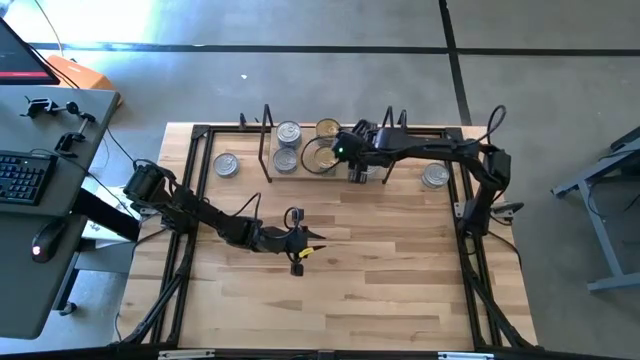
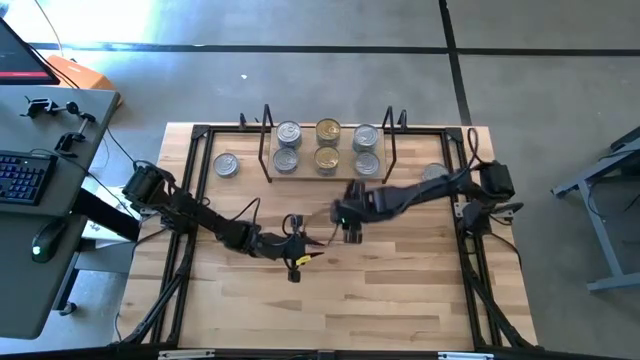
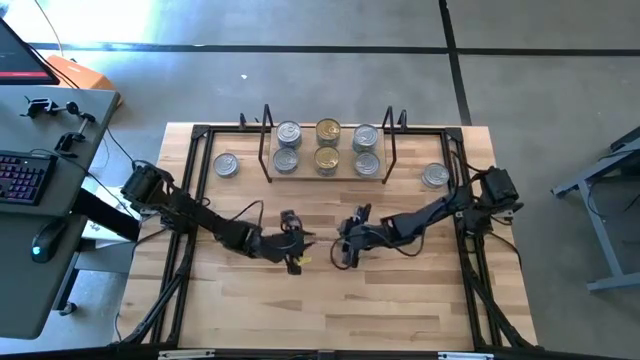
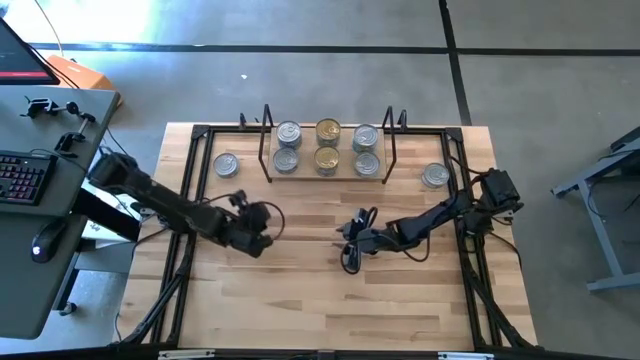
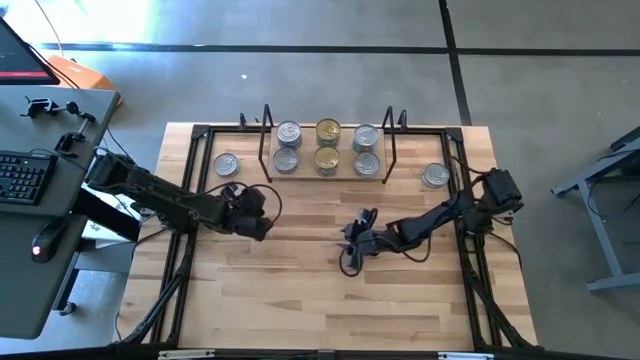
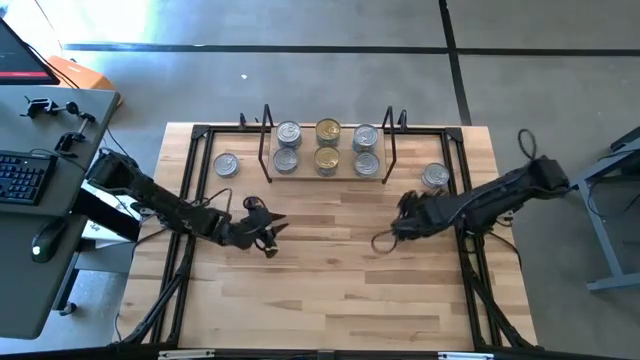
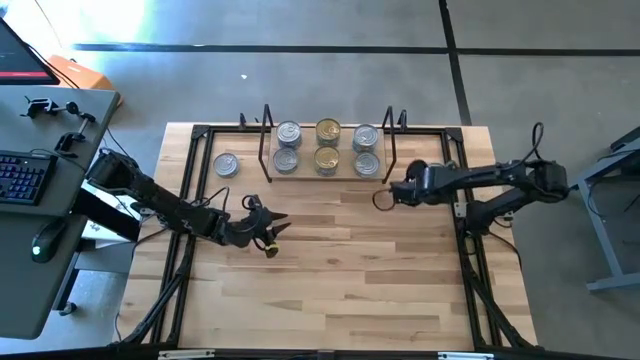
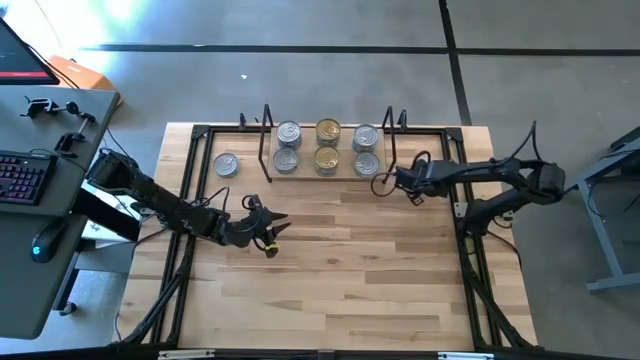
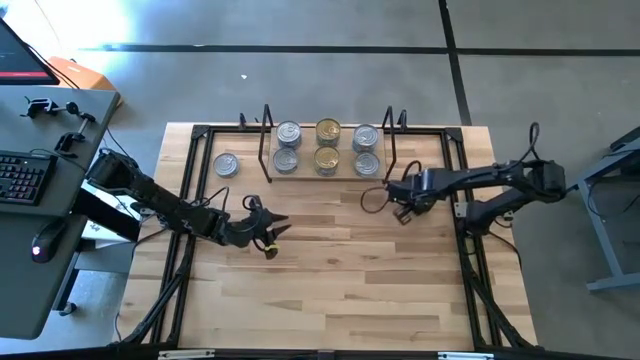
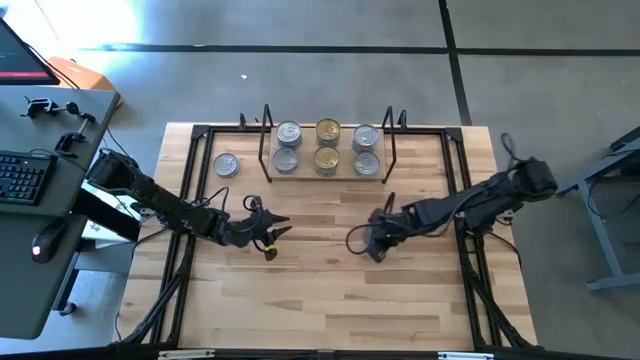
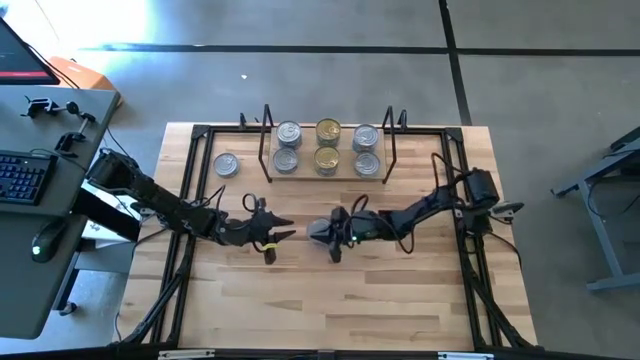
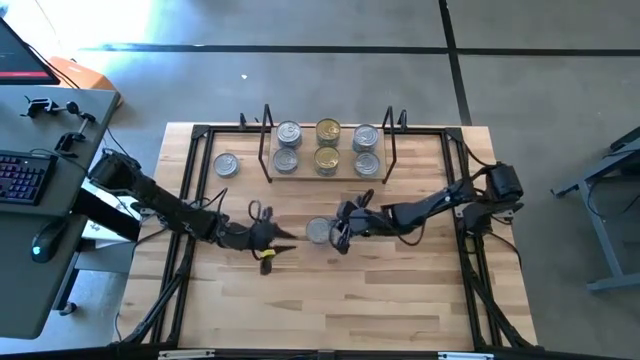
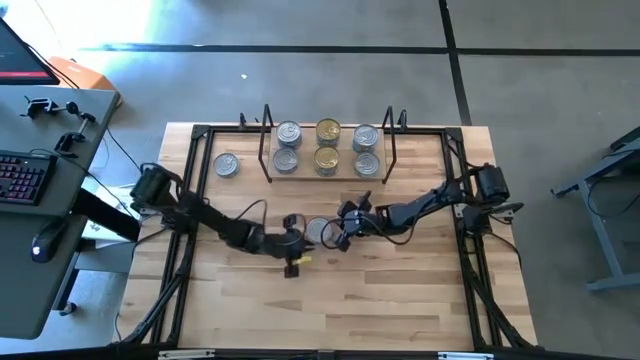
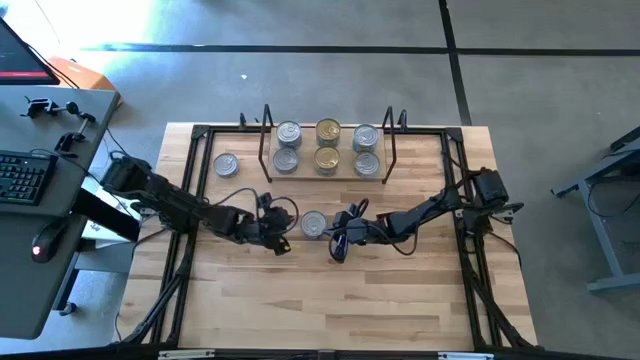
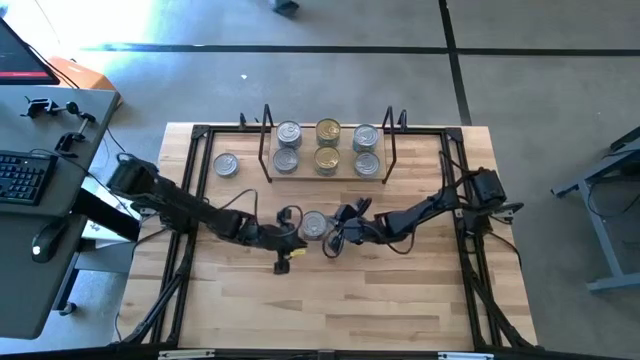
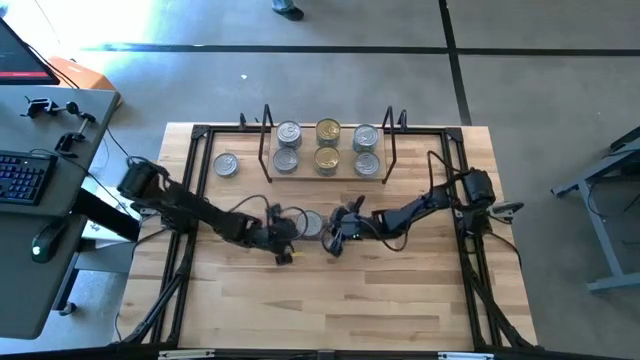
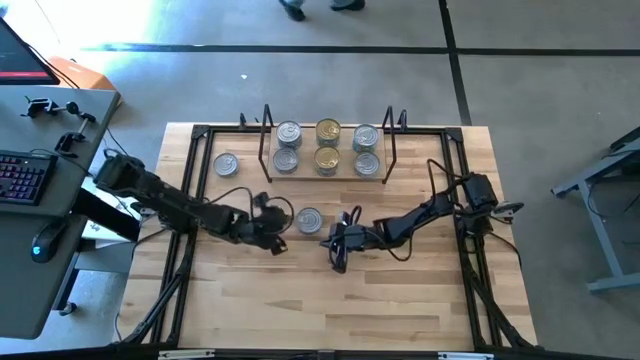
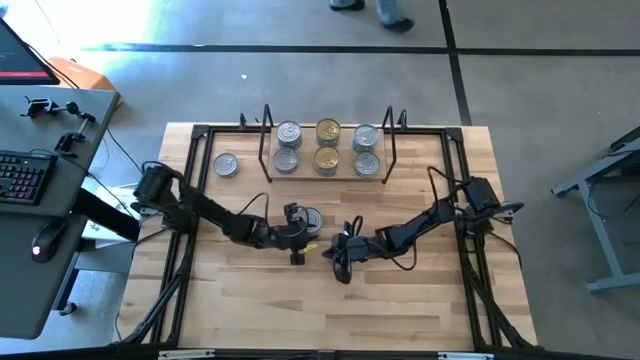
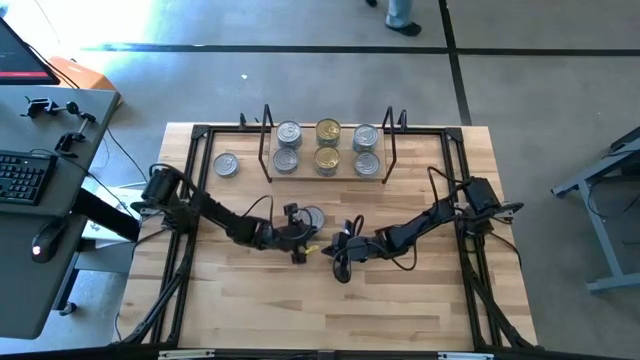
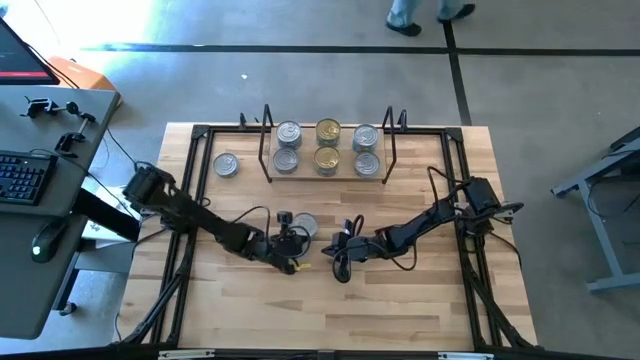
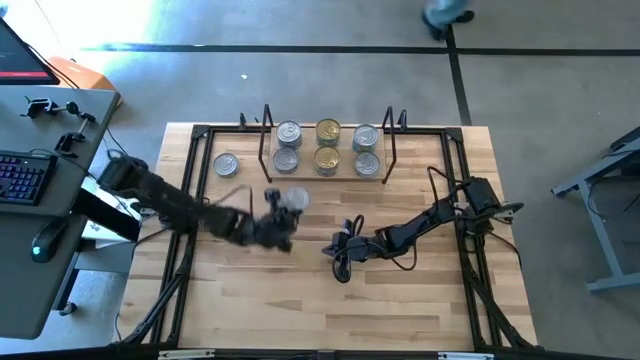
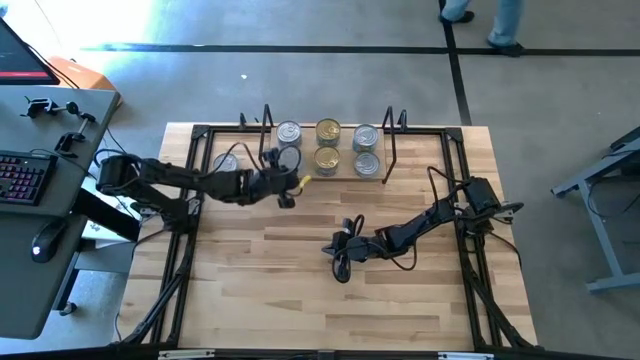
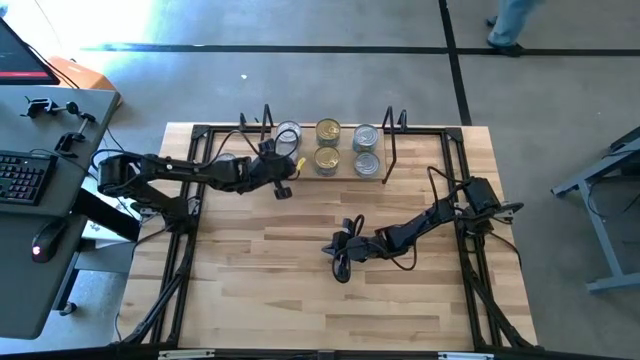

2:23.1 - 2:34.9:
Task: Stack canned seafood by type on shelf
Stack the blue tuna can on top of the other blue tuna can on the shelf

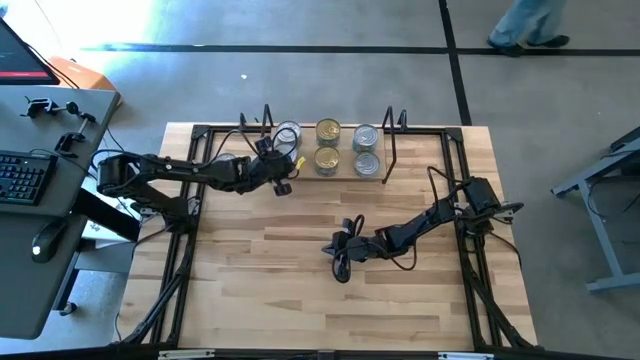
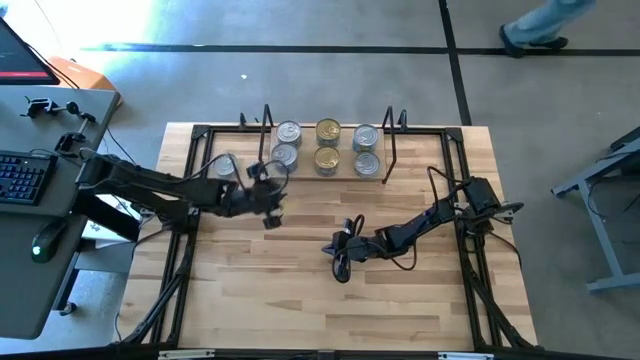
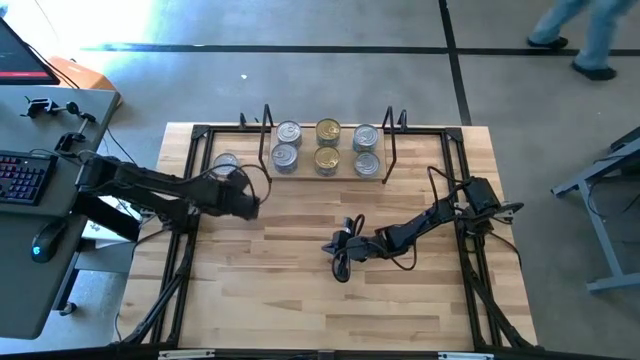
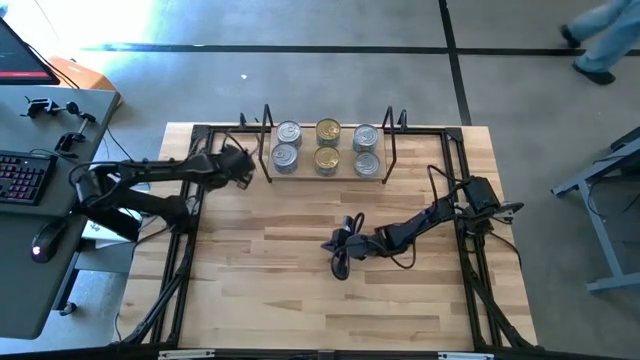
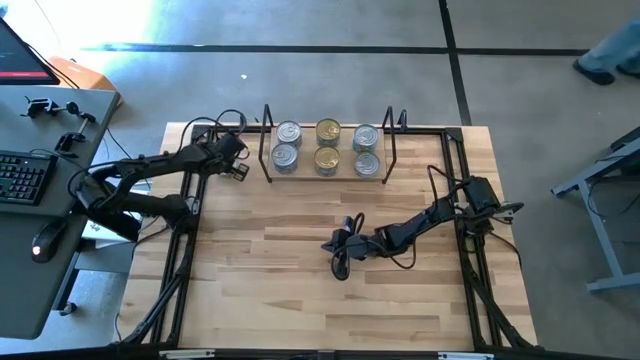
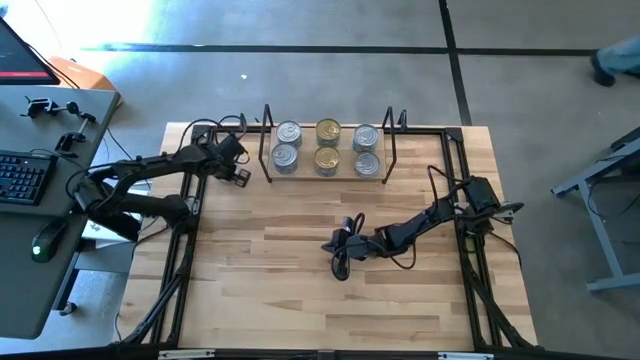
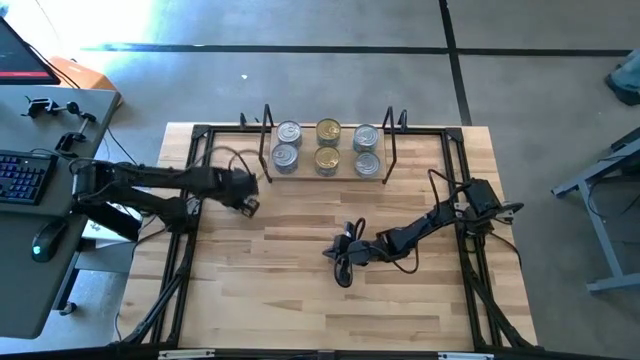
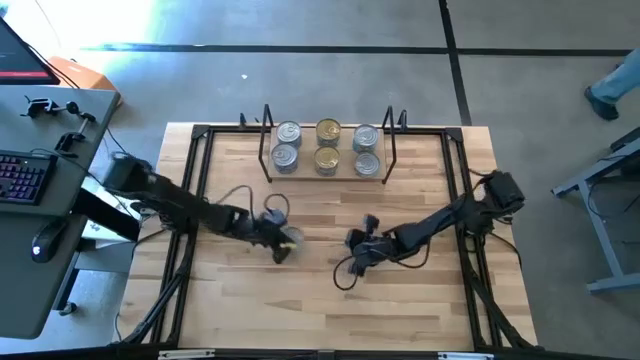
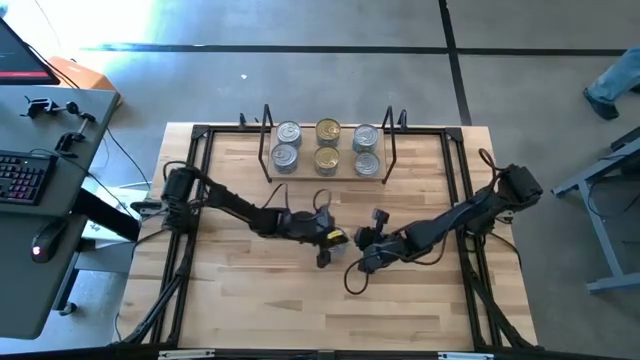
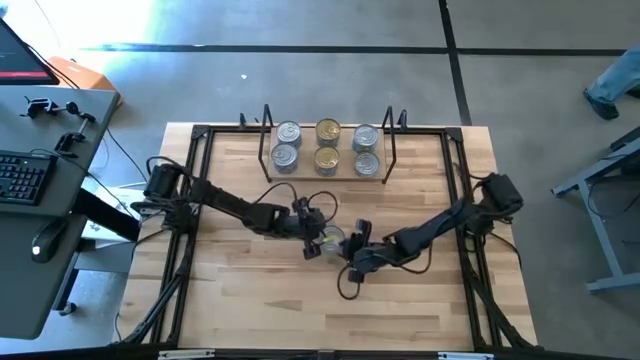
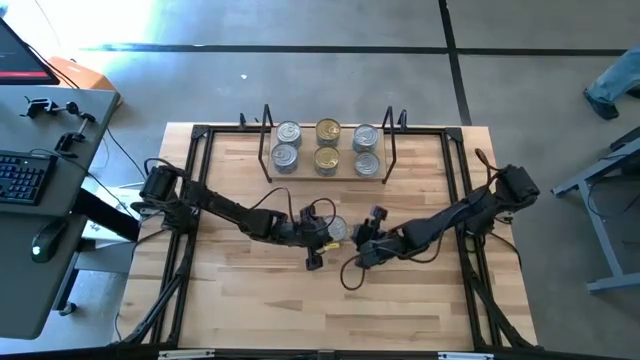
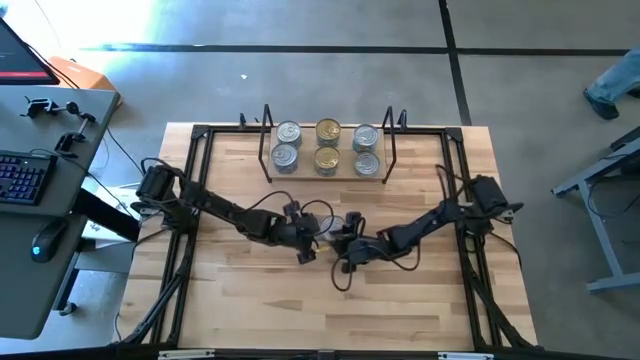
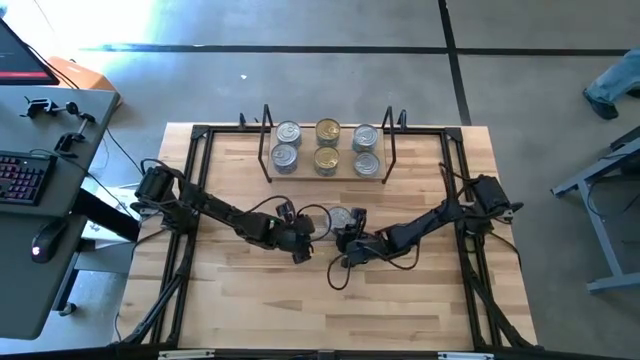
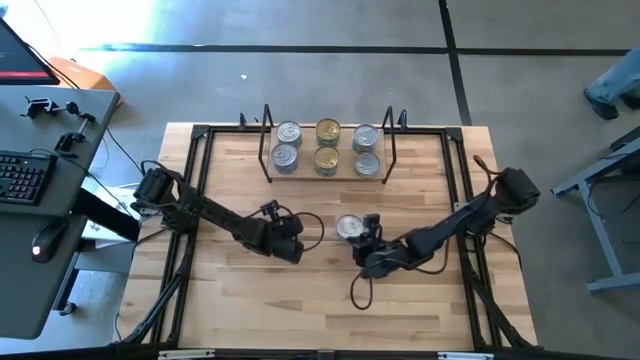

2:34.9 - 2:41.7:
Stack the Green-blue tuna can on top of the other Green-blue tuna can on the shelf

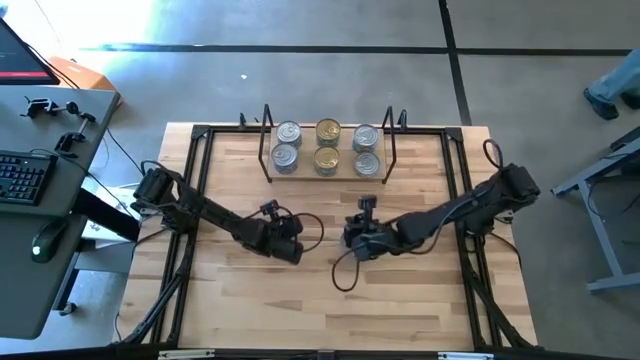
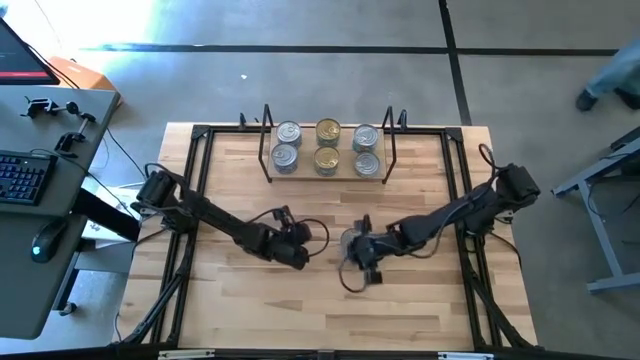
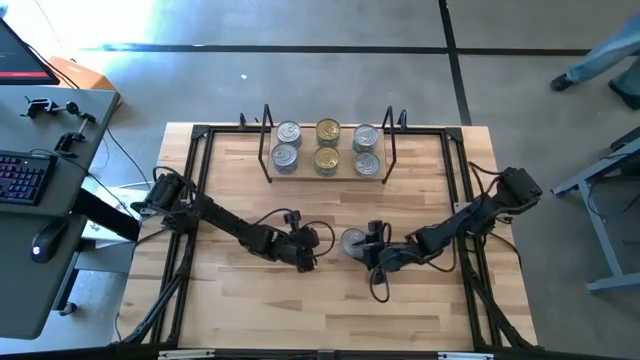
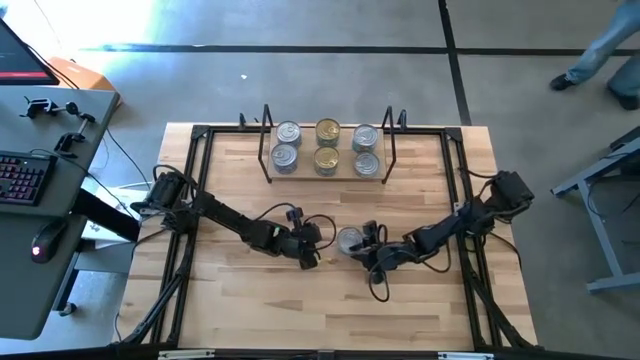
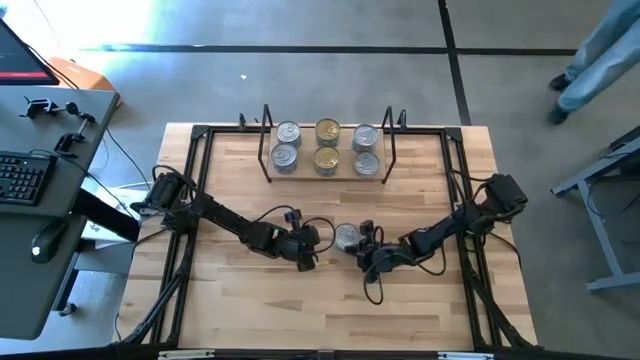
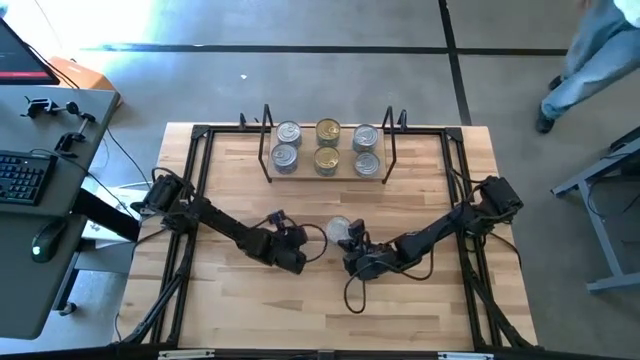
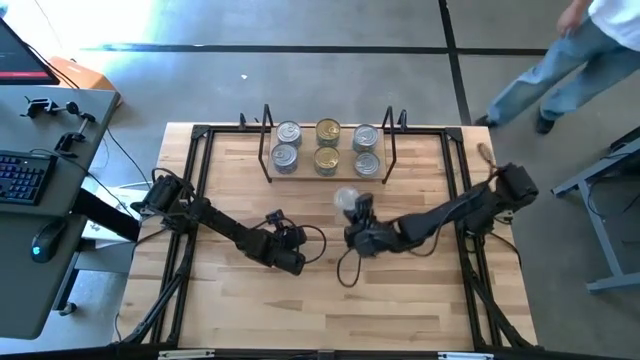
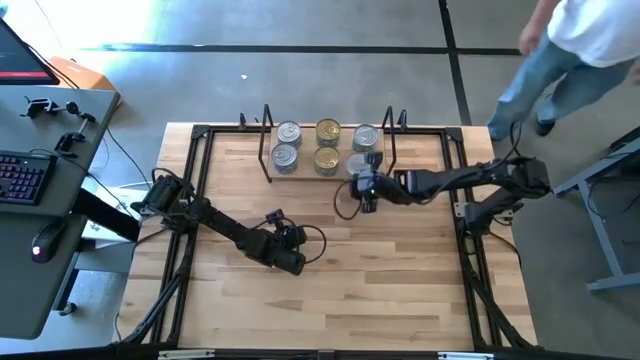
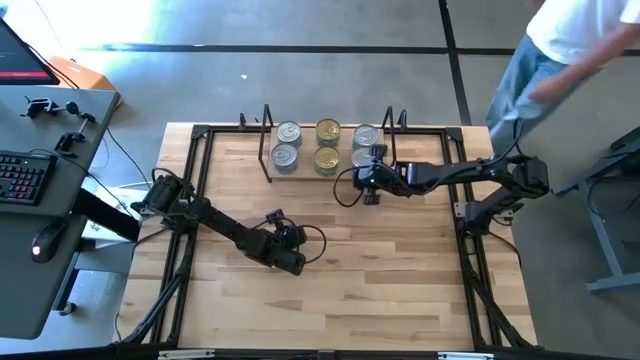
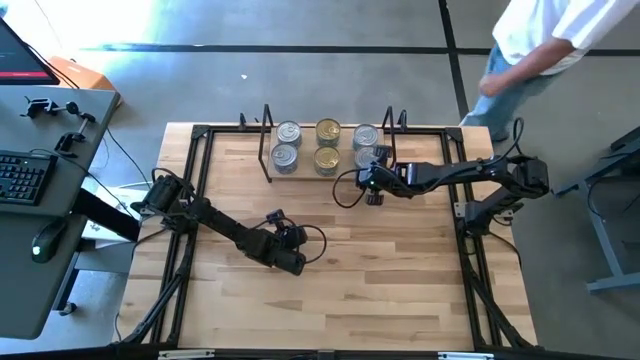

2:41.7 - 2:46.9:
Stack the Green-blue tuna can on top of the other Green-blue tuna can on the shelf
